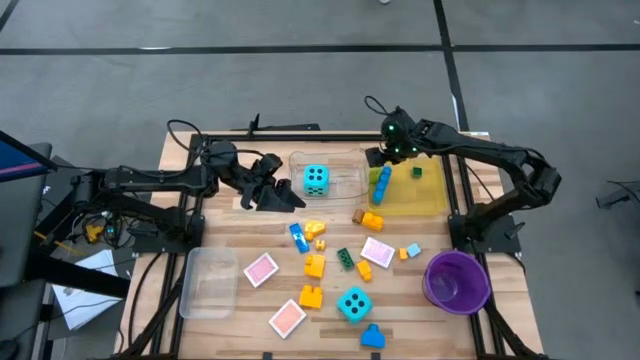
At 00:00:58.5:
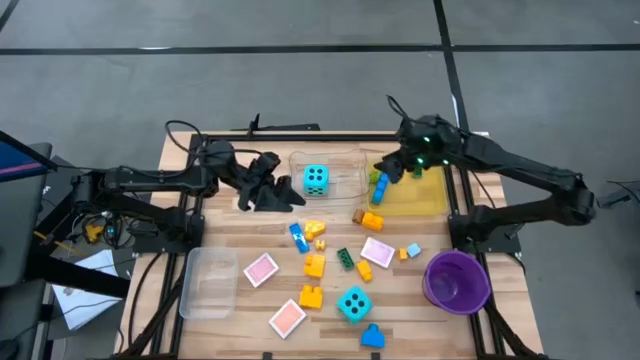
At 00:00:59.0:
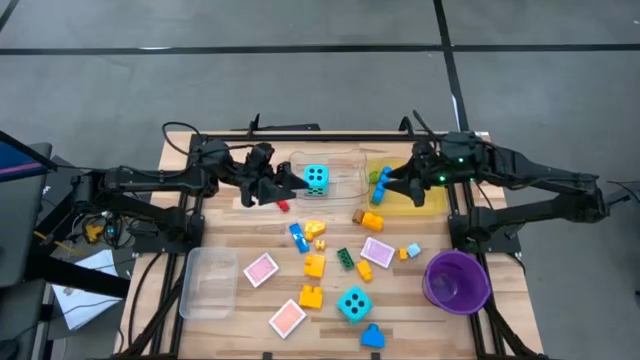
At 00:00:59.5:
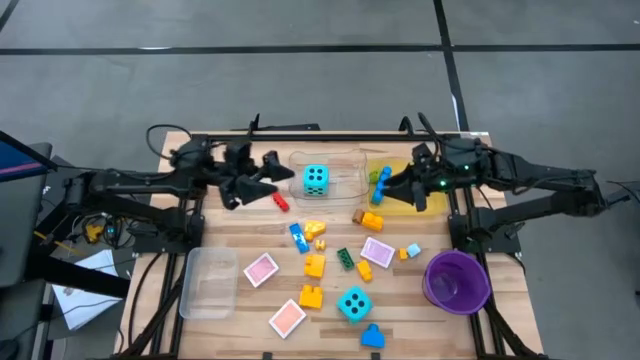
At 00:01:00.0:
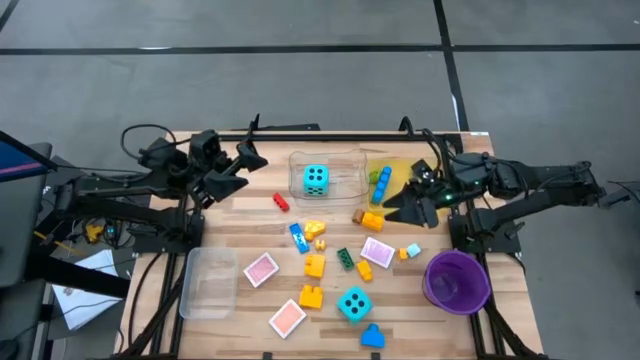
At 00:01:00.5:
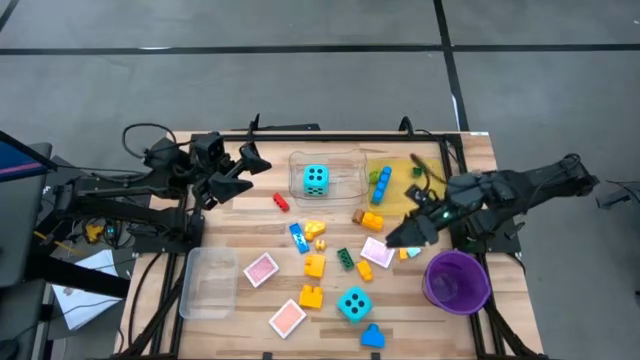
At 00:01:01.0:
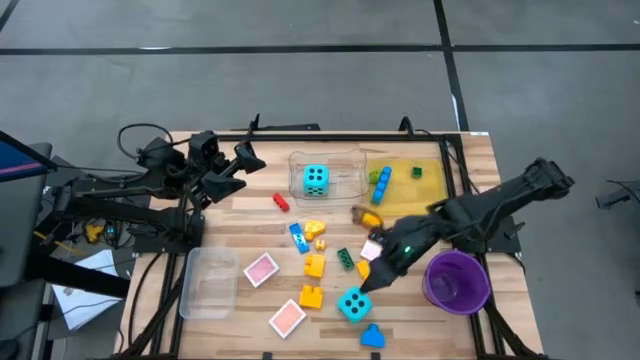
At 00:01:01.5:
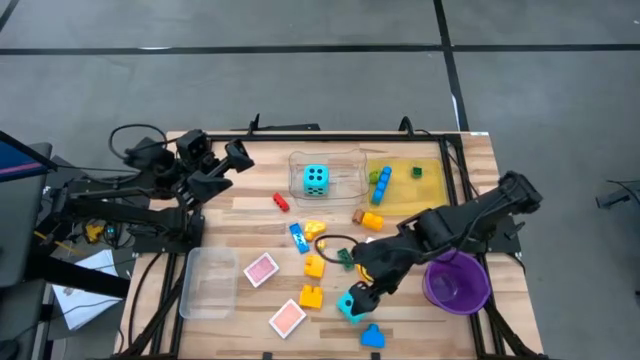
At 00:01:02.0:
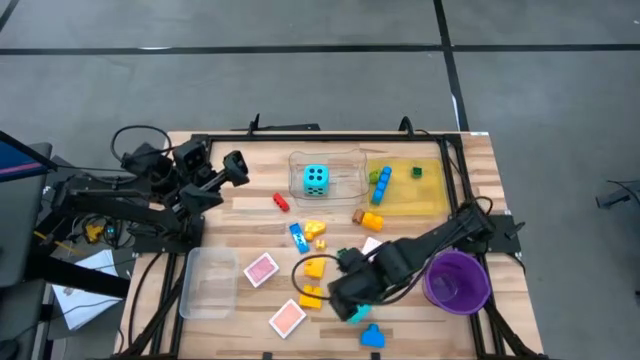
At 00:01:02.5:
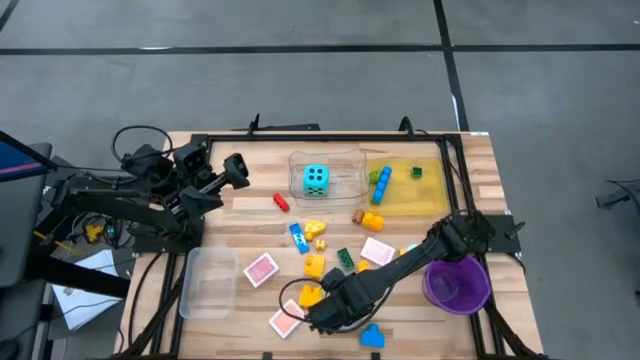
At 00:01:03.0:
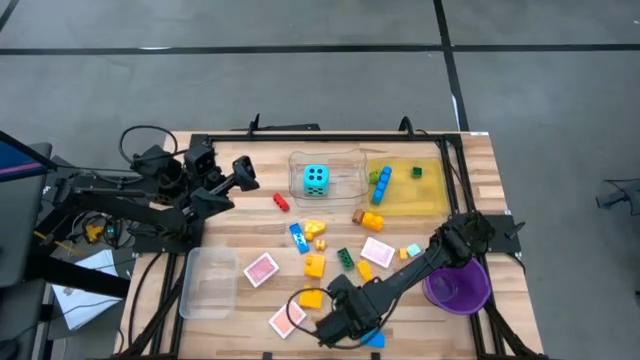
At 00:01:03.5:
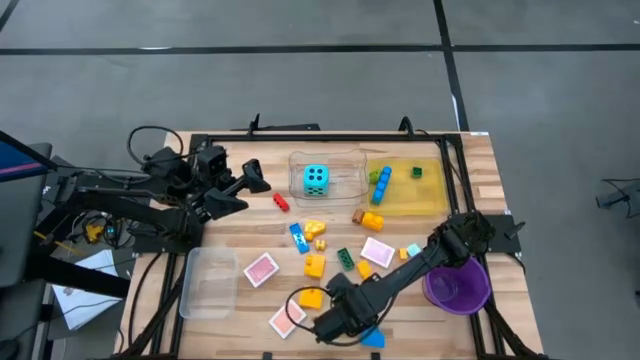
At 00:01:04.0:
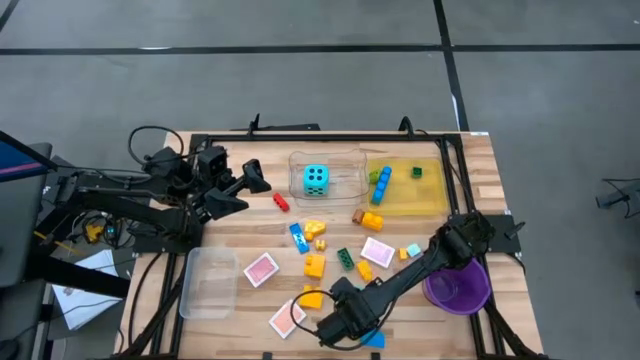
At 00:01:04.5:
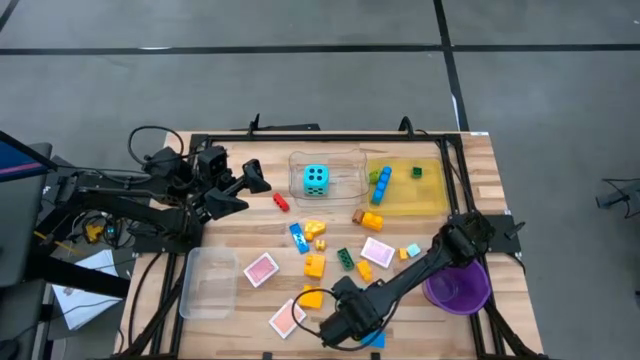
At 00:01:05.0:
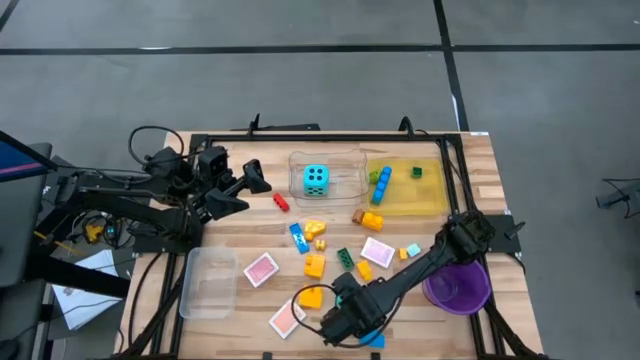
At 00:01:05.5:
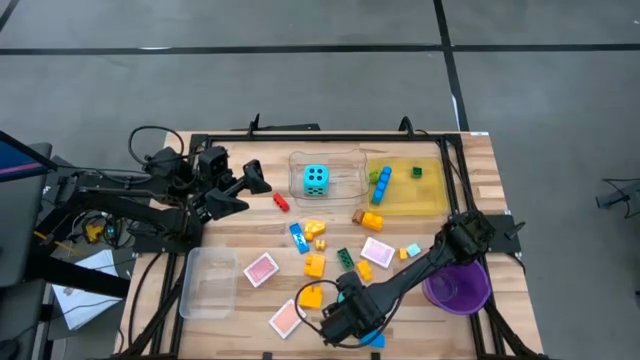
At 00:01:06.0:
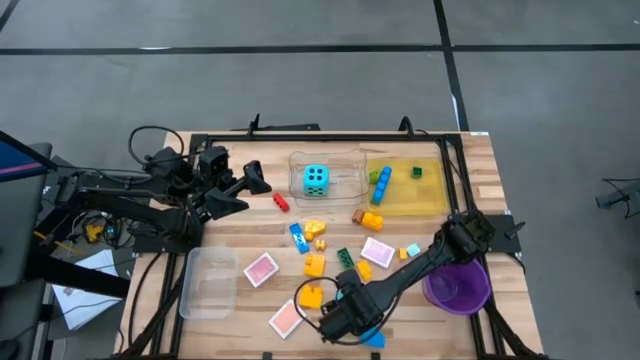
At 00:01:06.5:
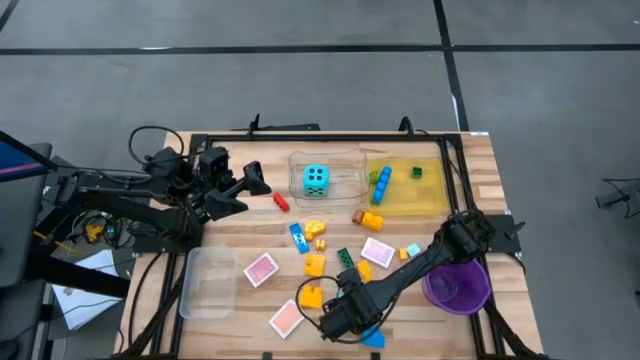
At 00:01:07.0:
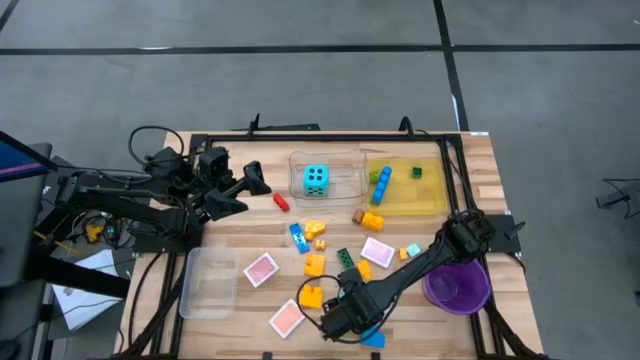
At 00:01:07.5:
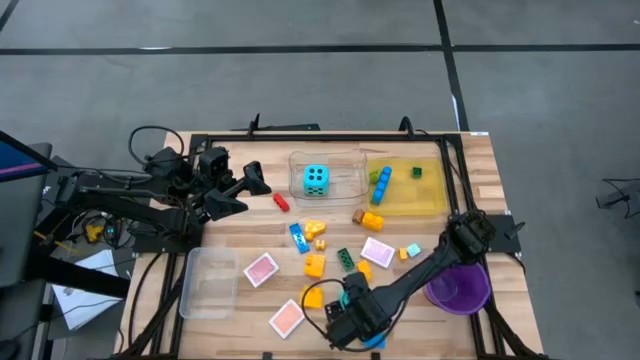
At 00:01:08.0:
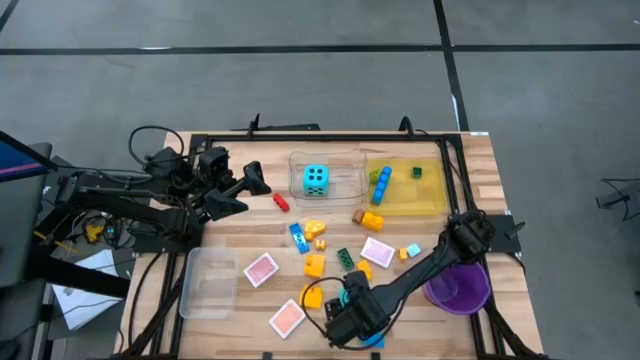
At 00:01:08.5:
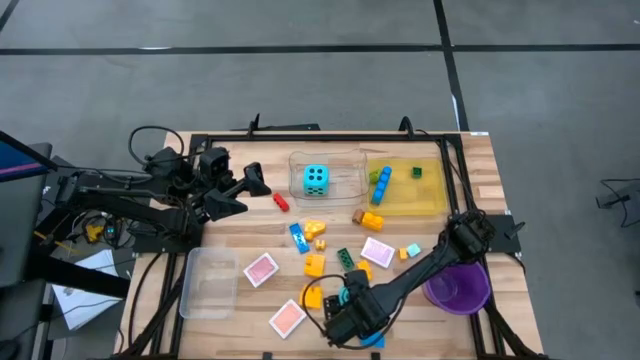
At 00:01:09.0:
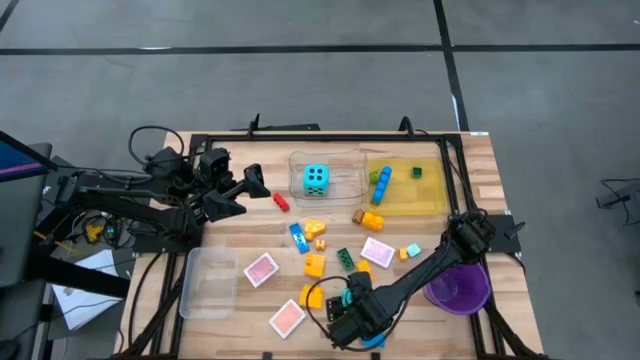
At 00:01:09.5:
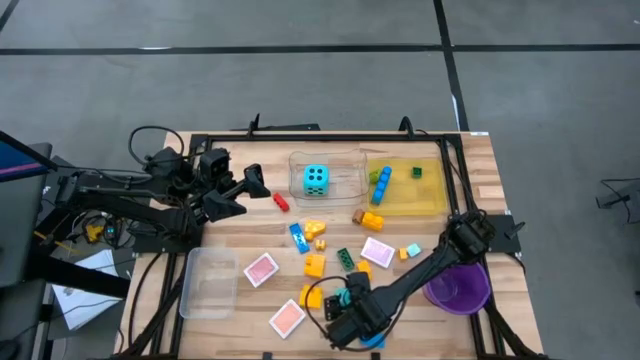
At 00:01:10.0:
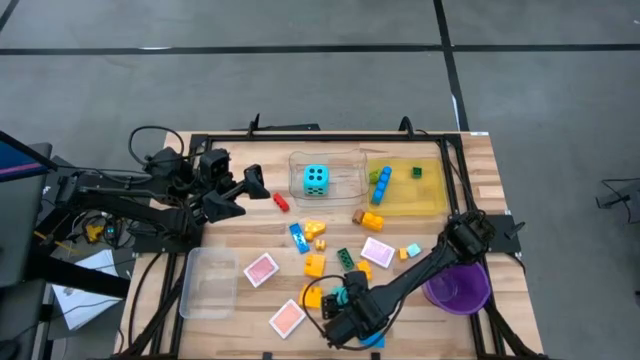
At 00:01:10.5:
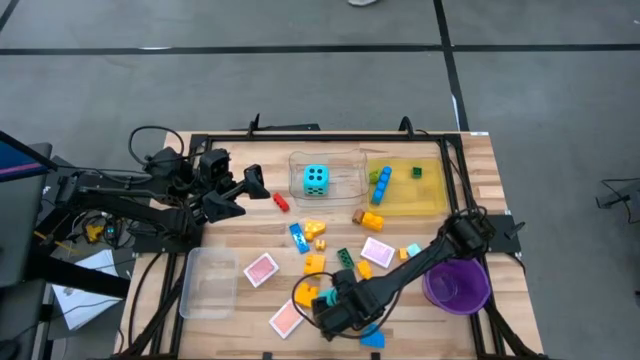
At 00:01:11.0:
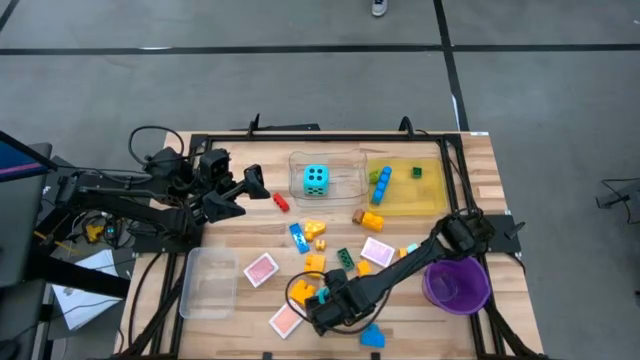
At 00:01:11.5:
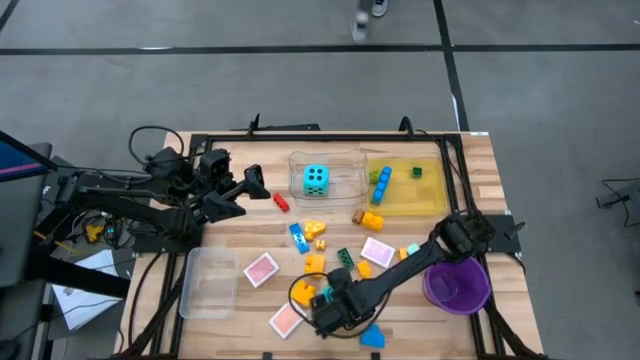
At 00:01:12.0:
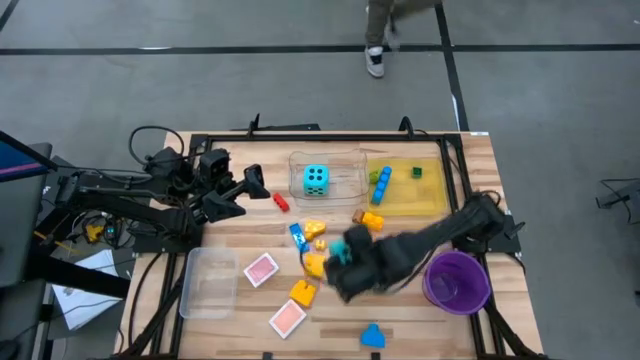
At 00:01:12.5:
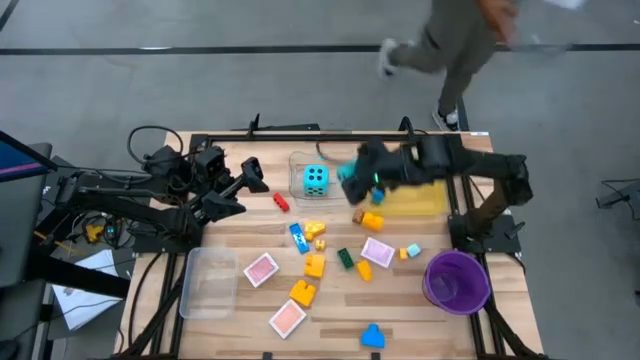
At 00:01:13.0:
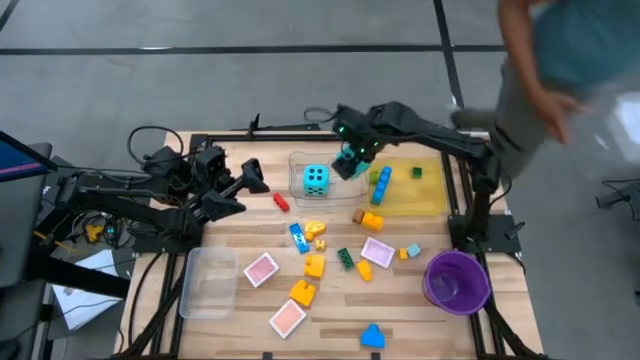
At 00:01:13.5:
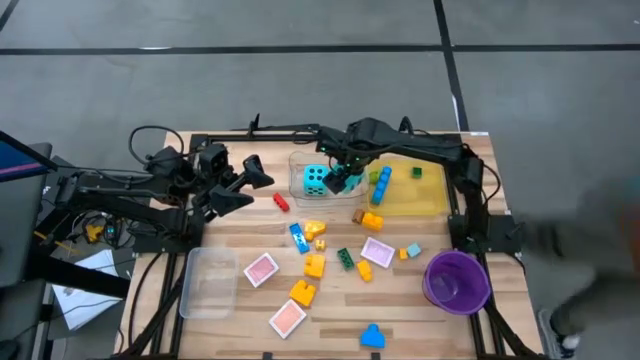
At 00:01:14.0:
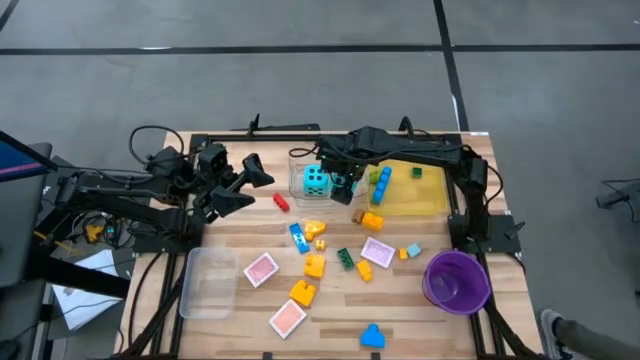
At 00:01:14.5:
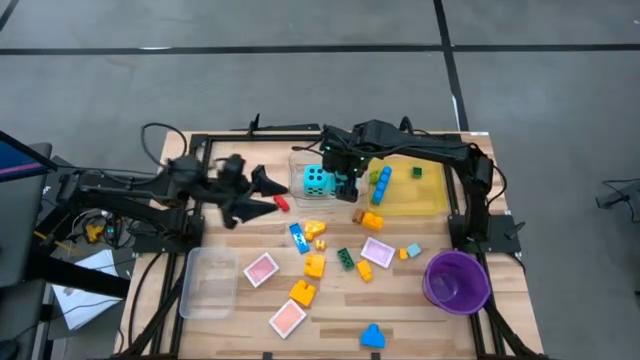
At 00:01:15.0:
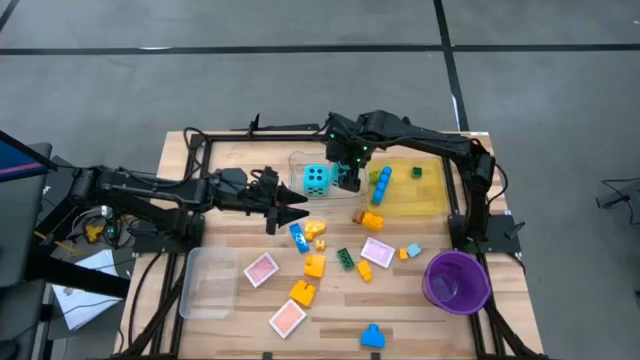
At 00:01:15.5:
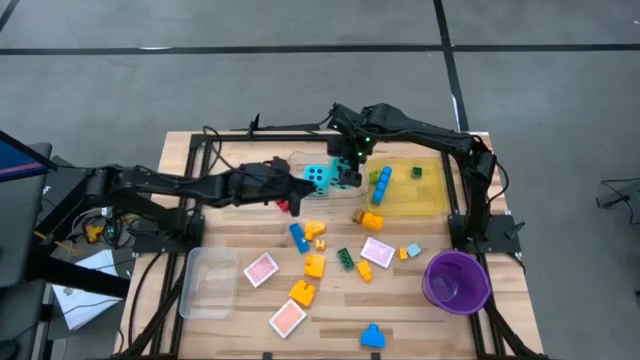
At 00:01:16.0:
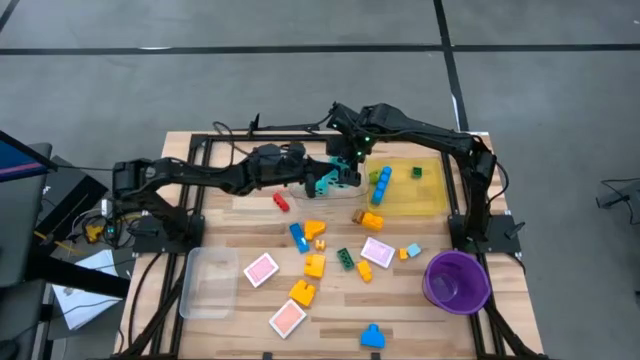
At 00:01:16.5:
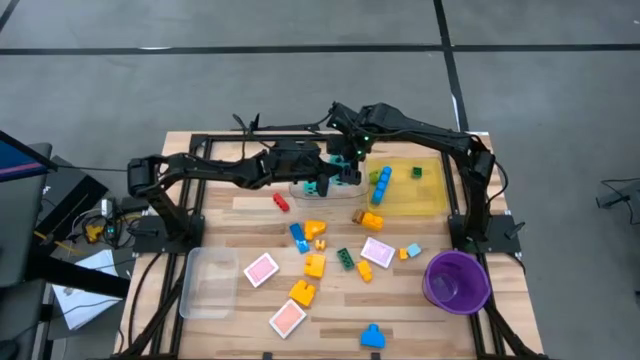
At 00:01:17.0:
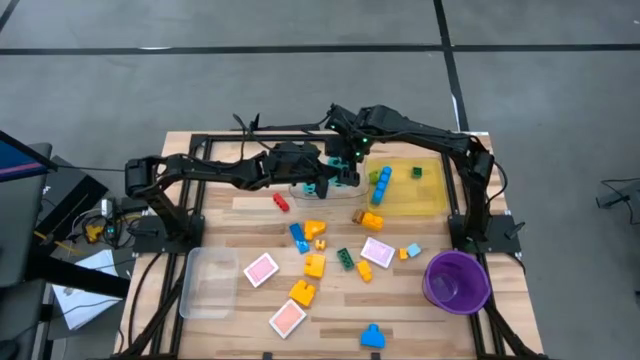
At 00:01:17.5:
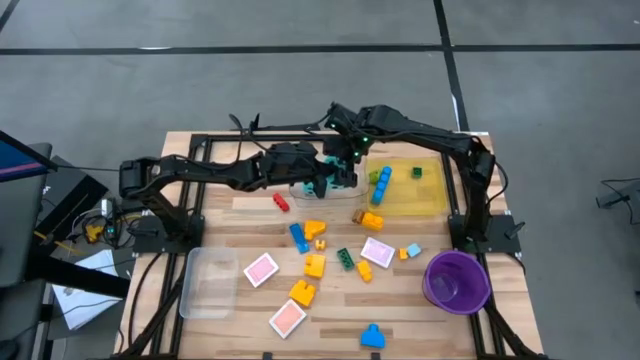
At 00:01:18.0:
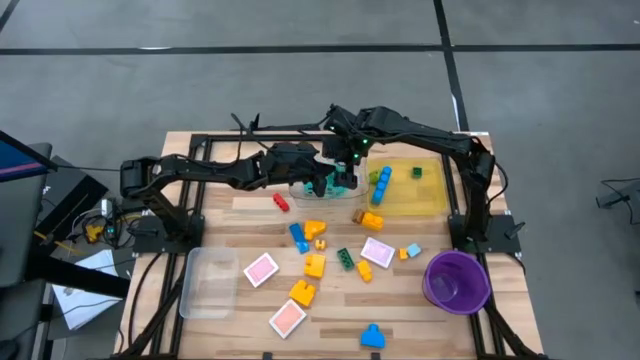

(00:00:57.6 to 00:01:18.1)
Task: Pick & Place Toys
Put the blue dice into the transparent bin
